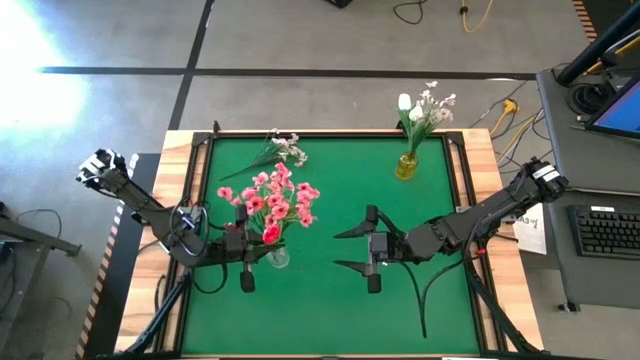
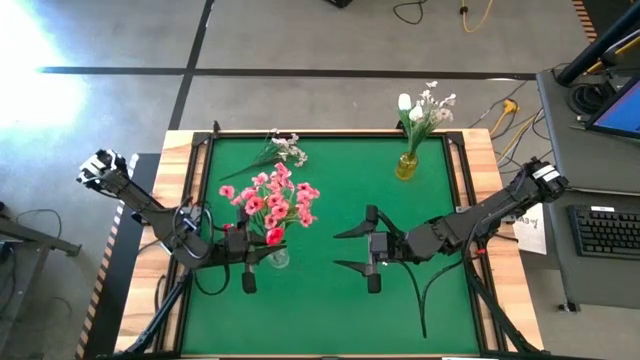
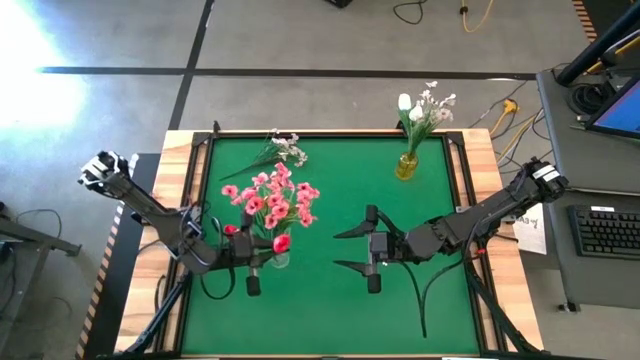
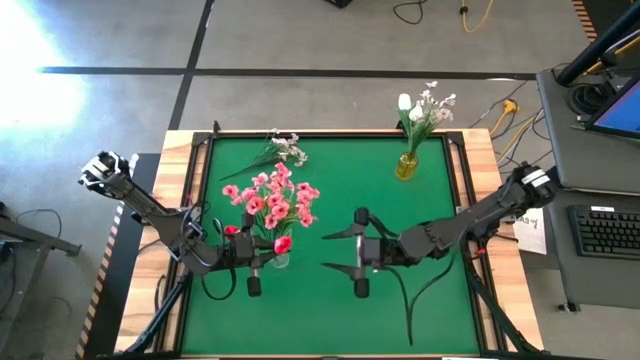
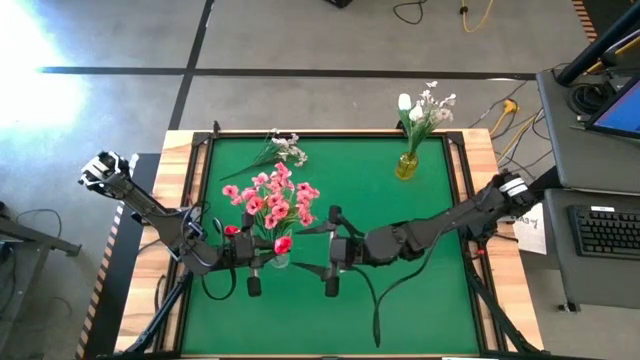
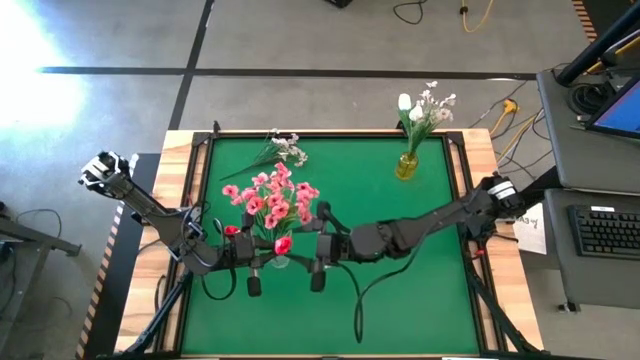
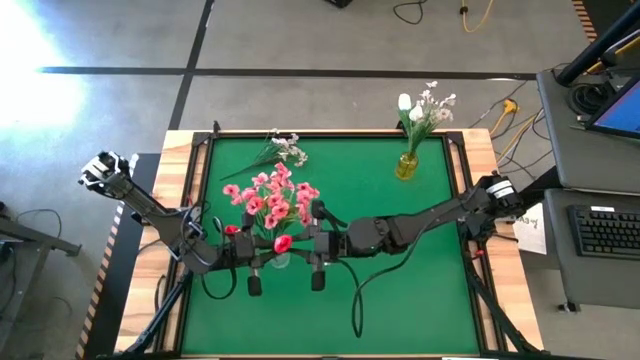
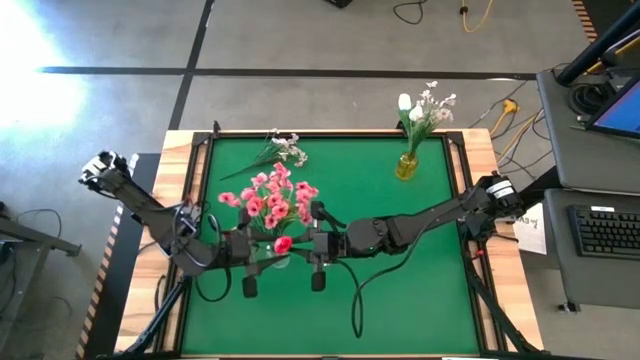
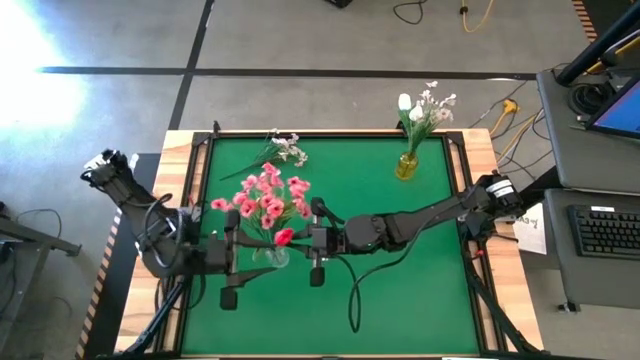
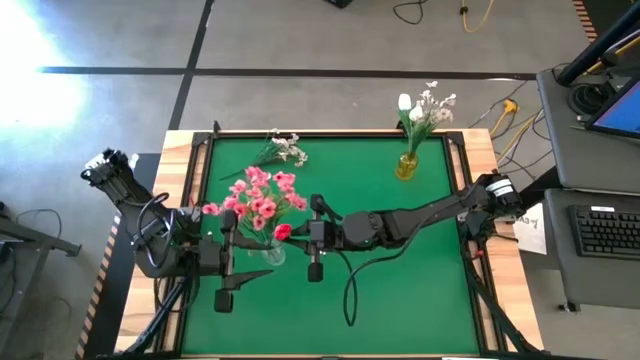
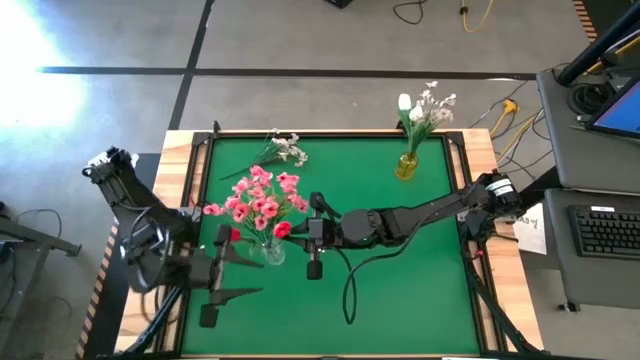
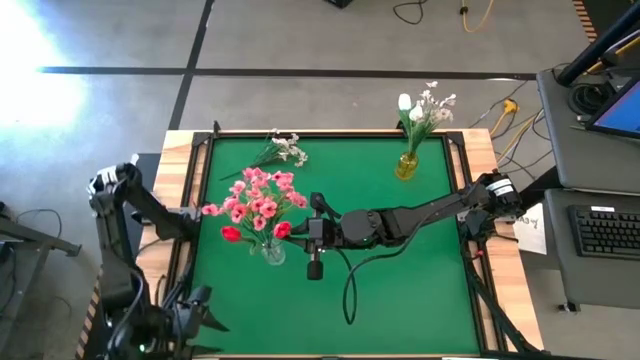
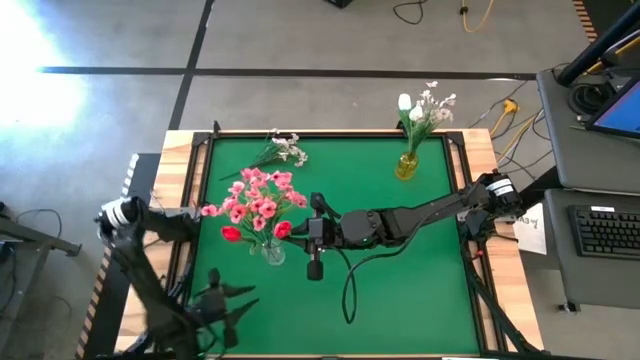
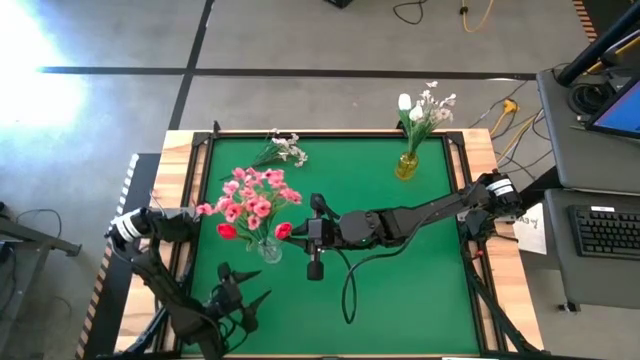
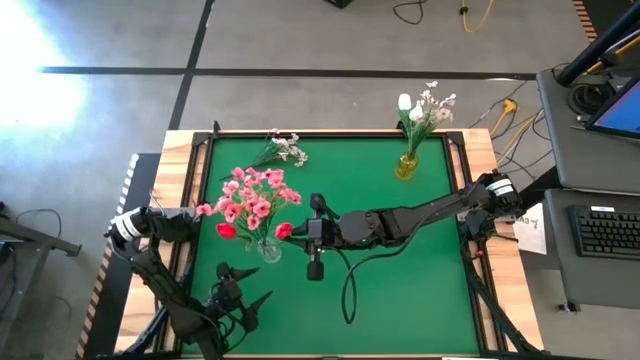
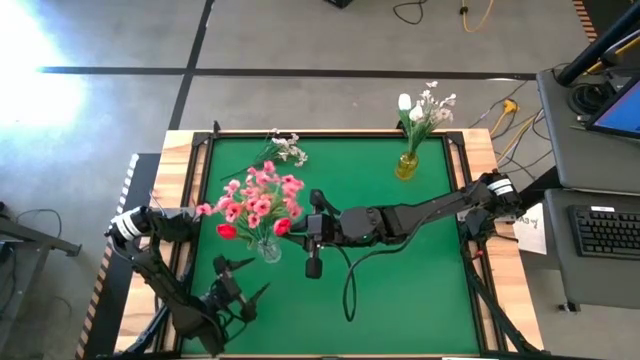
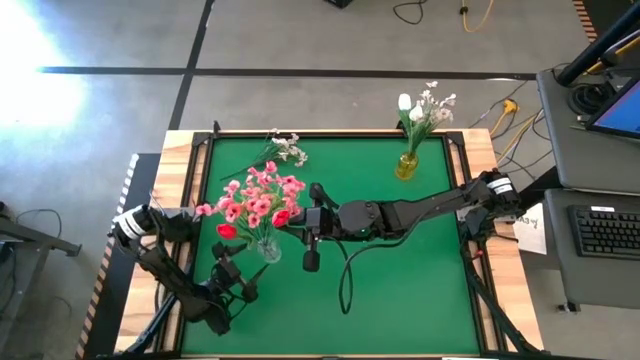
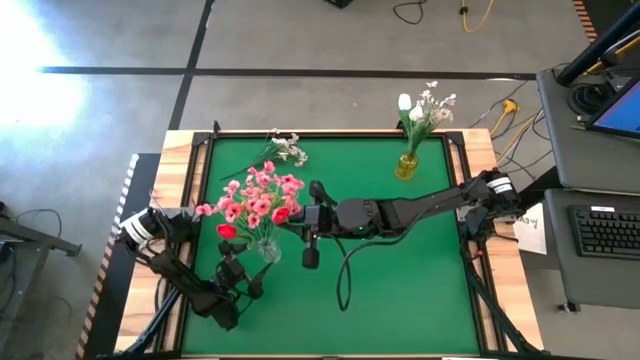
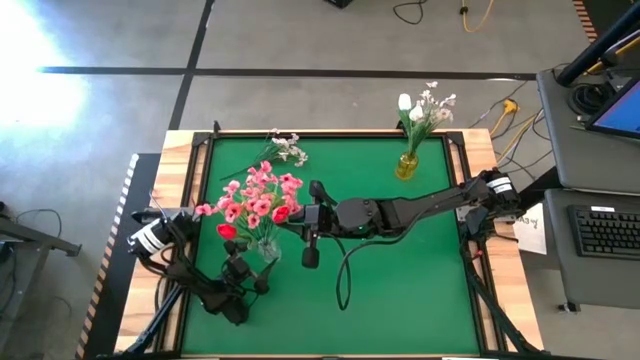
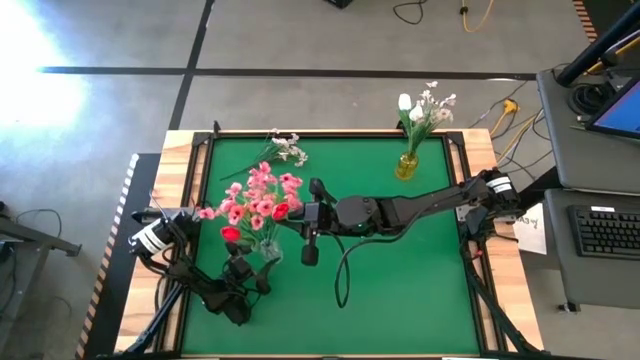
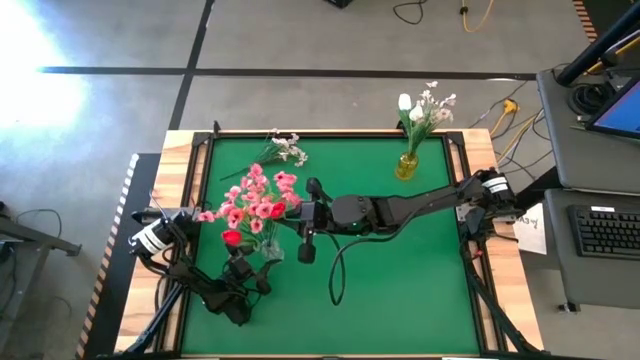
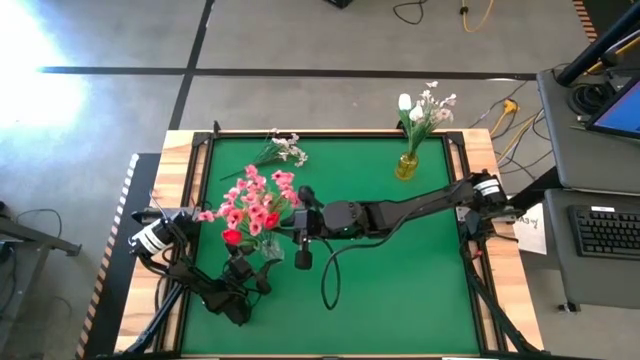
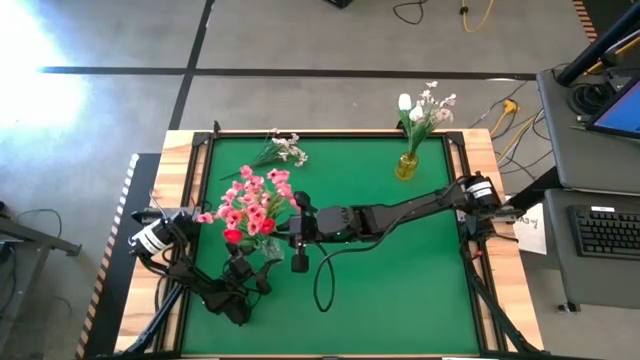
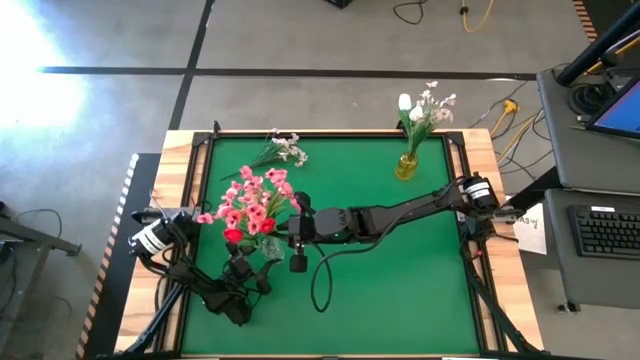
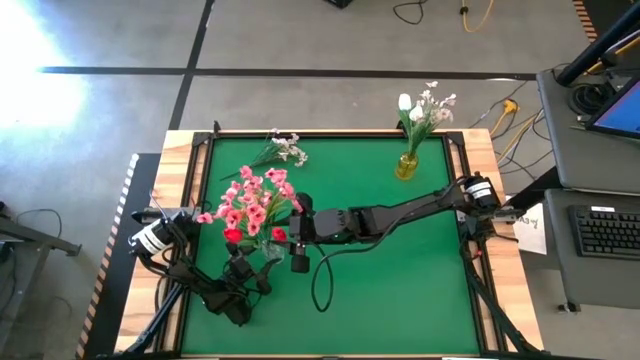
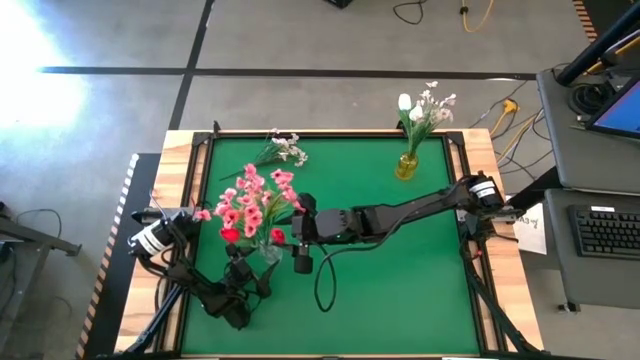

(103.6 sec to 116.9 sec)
Task: Sort flowers into vase by color
Put the red flowers into the transparent vase

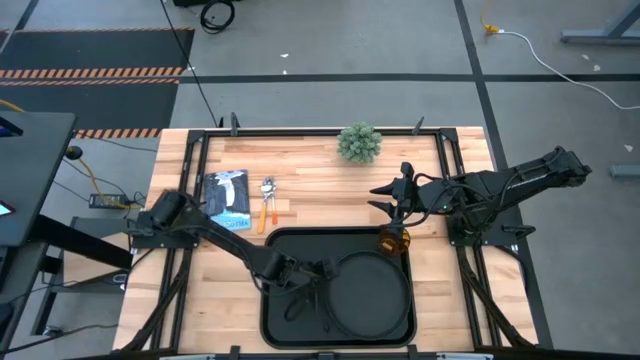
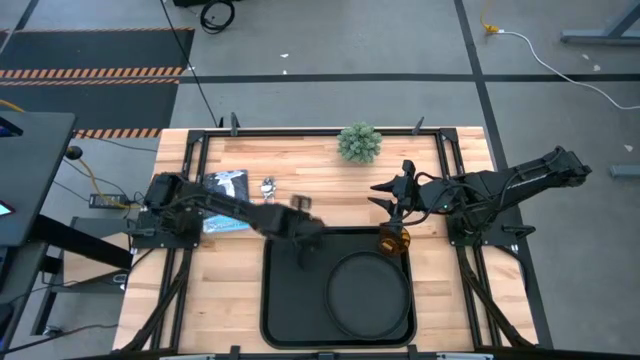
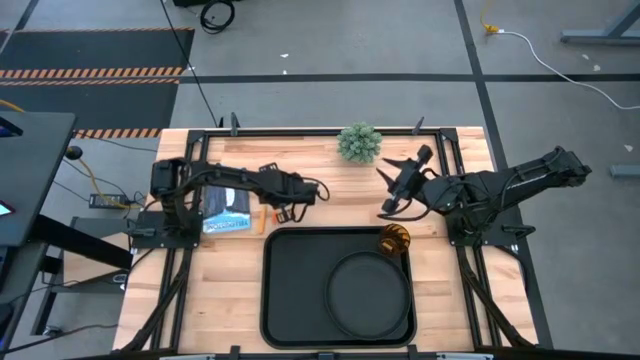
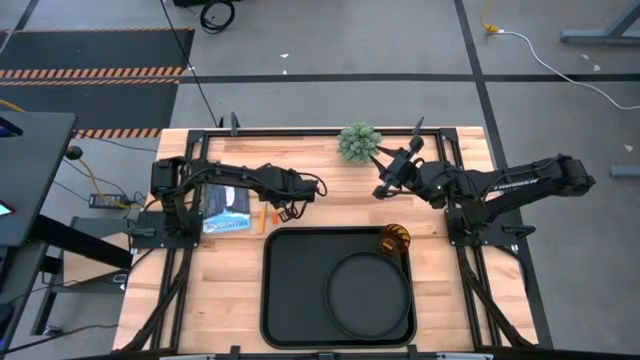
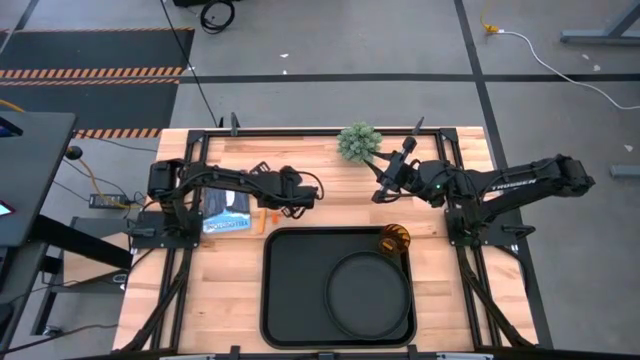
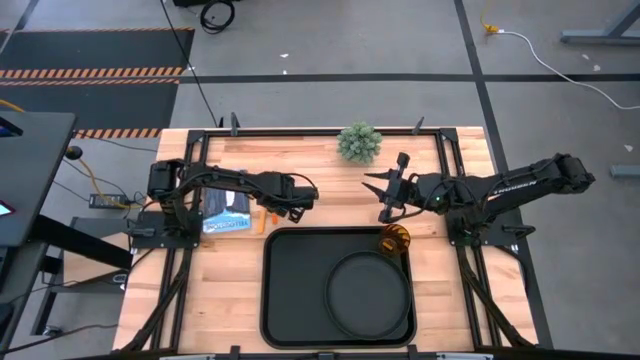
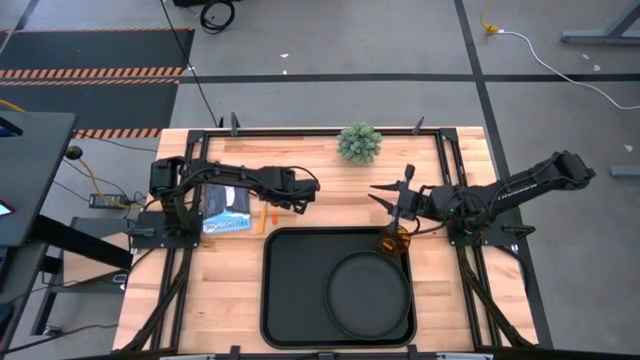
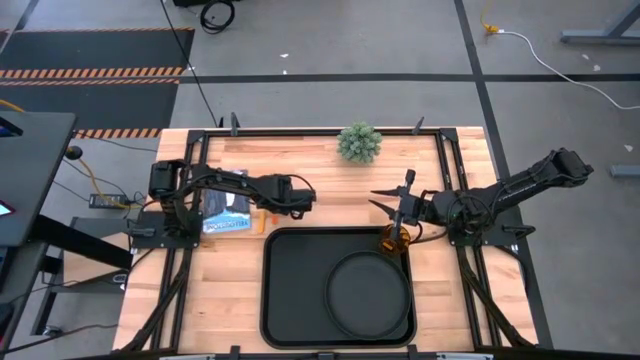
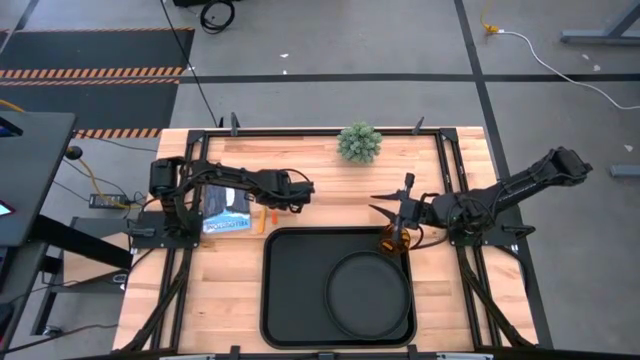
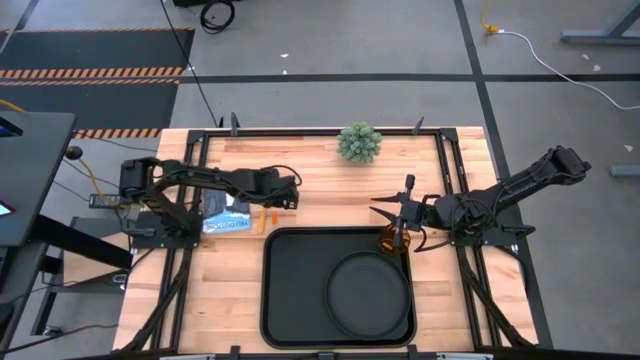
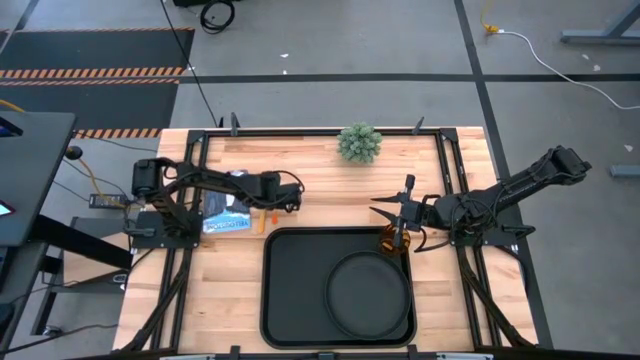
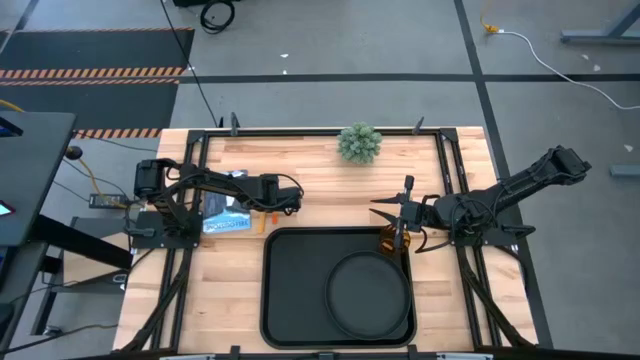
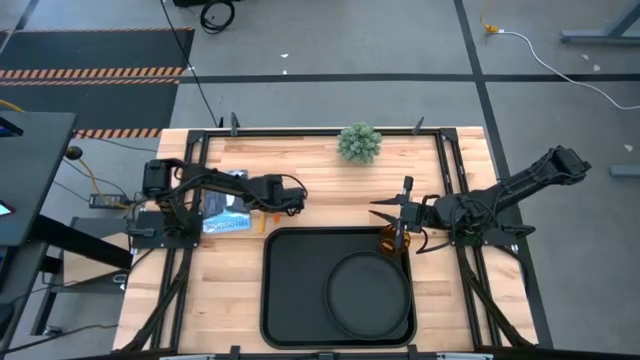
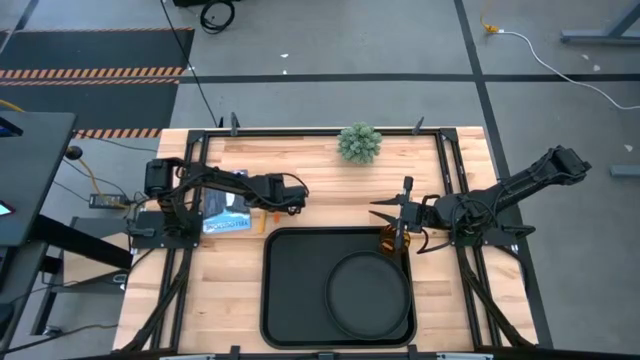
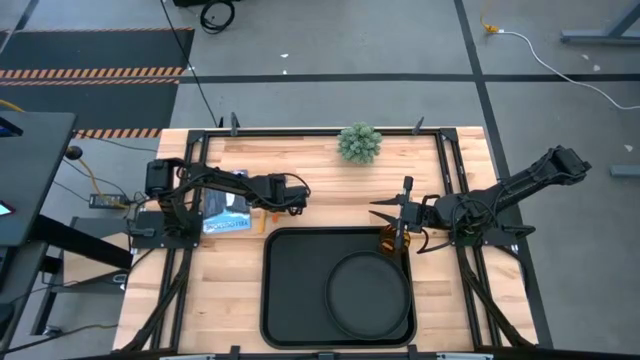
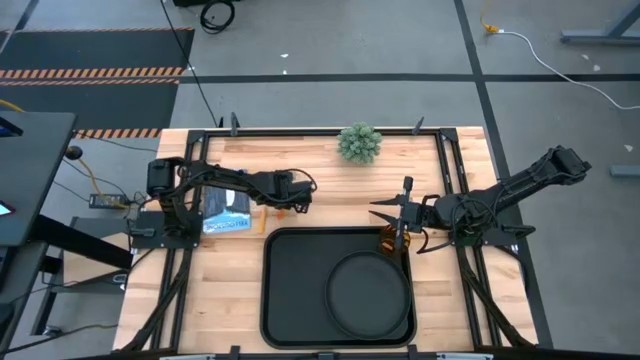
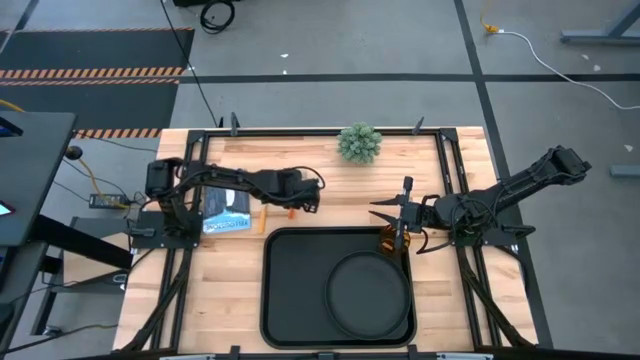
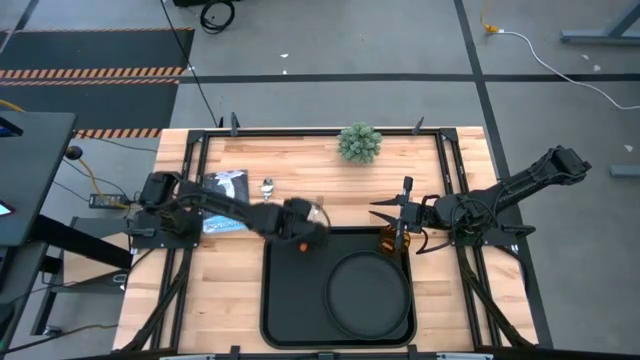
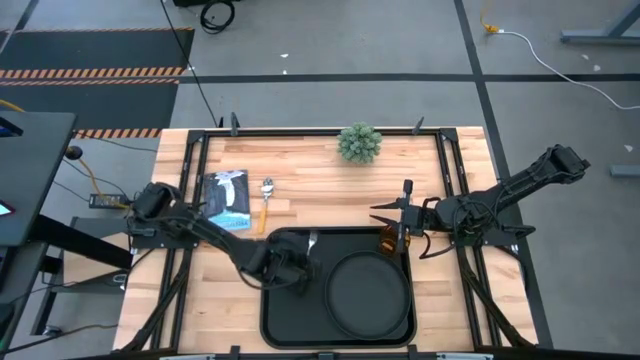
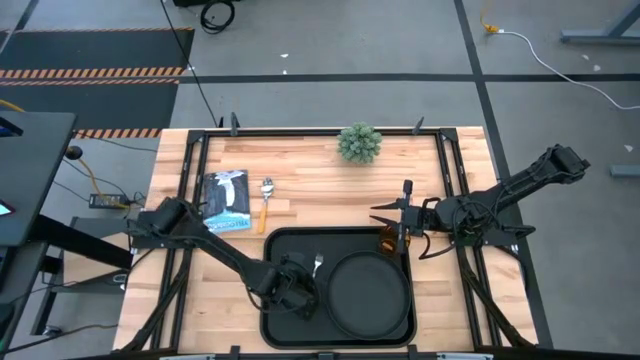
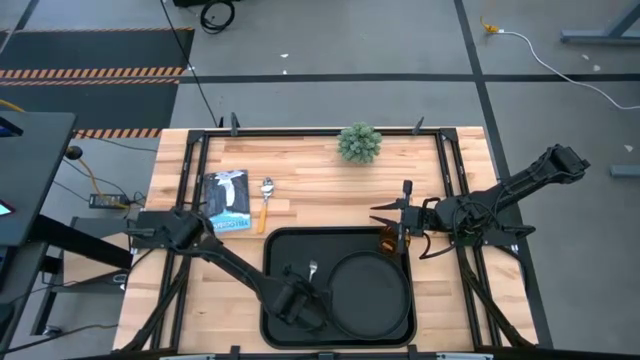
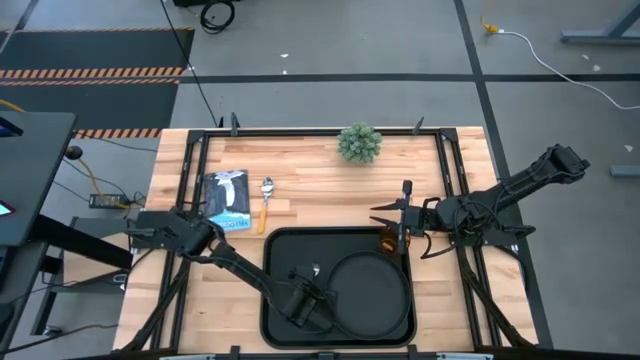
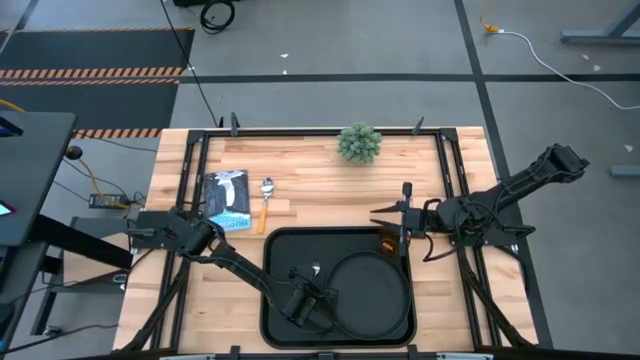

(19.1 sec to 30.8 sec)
Task: Pick and place plate/cup/fork/spoon on tray
Put the orange fork on the black tray to the left of the black plate
